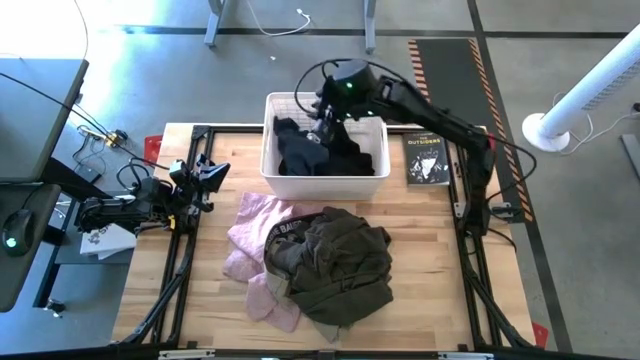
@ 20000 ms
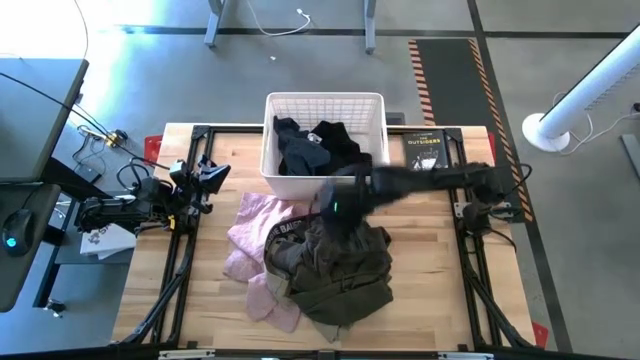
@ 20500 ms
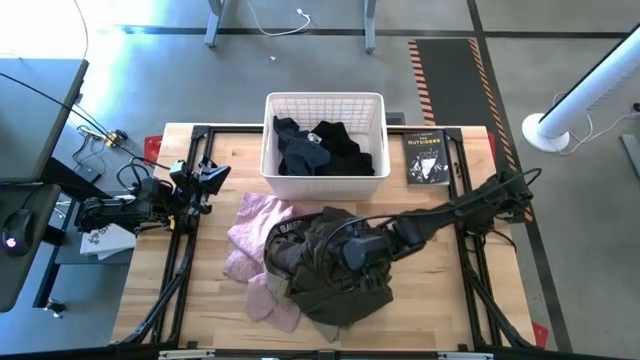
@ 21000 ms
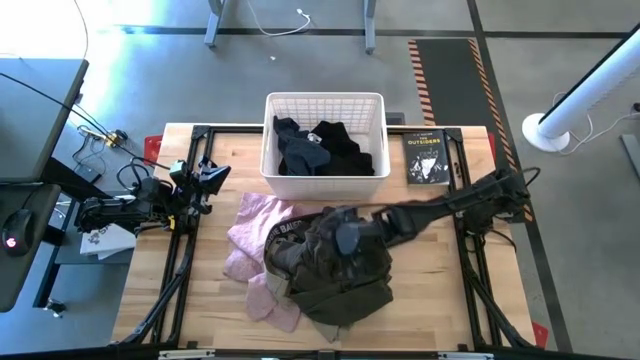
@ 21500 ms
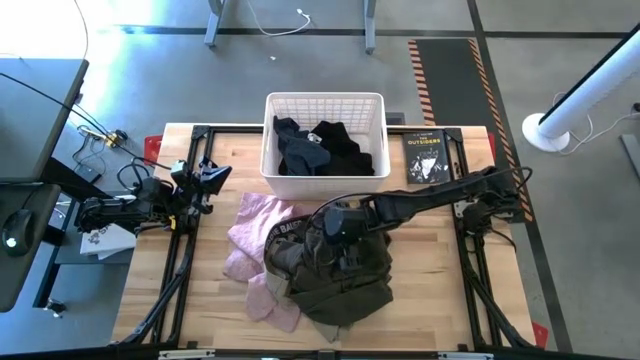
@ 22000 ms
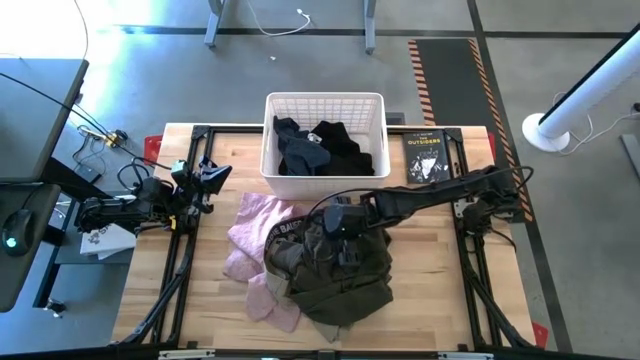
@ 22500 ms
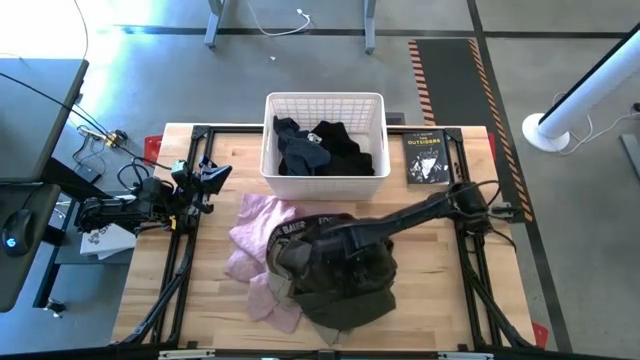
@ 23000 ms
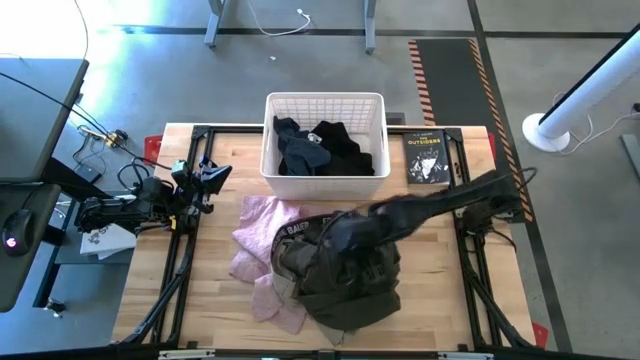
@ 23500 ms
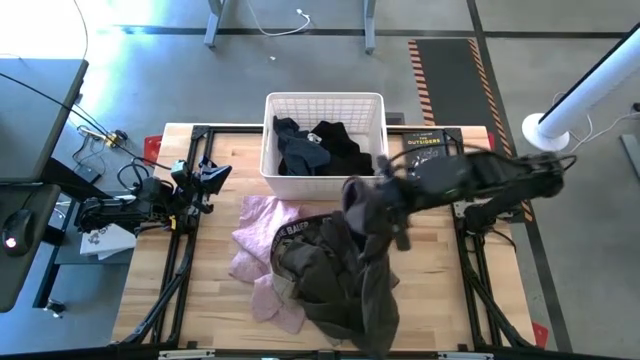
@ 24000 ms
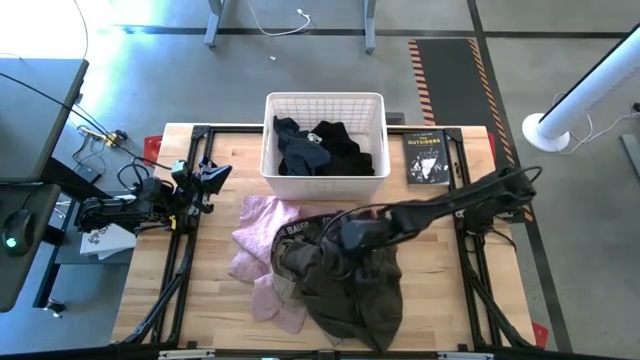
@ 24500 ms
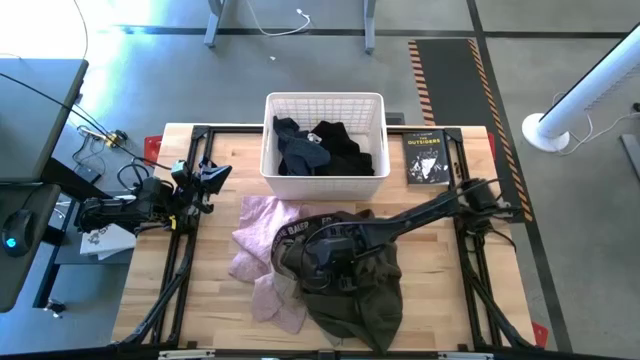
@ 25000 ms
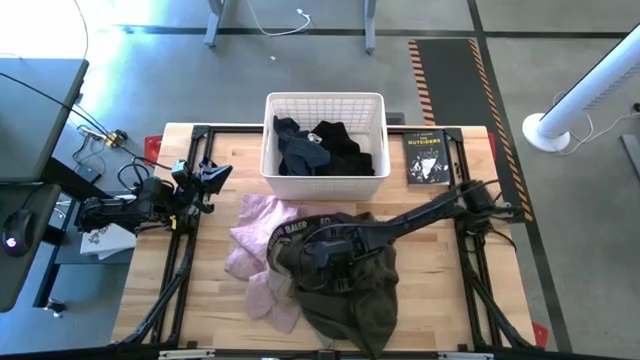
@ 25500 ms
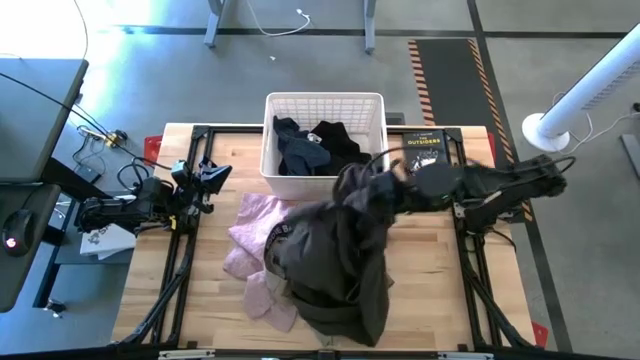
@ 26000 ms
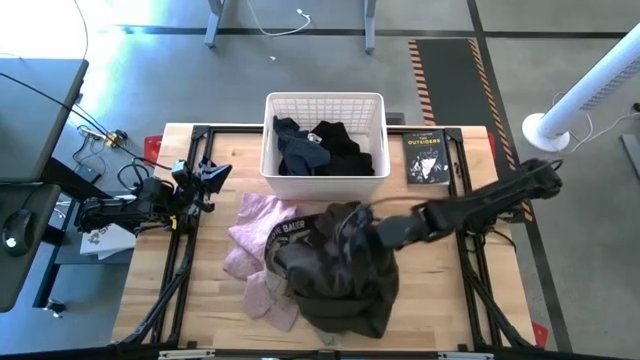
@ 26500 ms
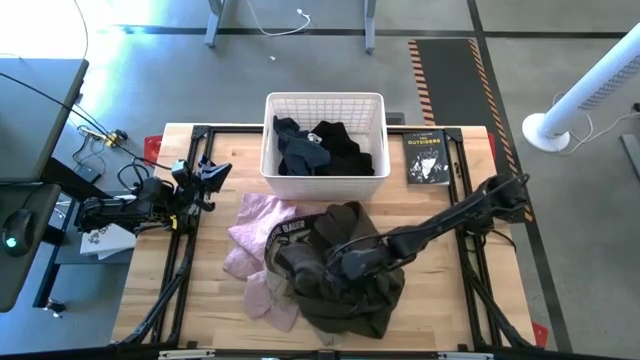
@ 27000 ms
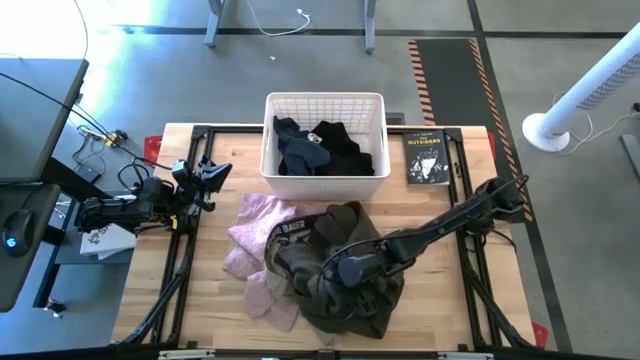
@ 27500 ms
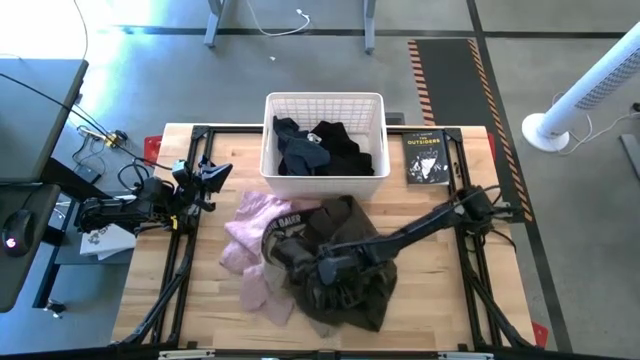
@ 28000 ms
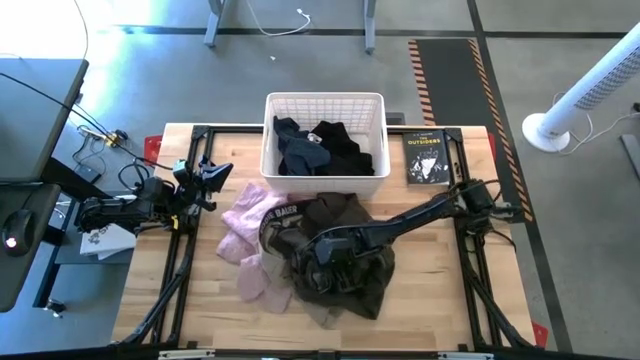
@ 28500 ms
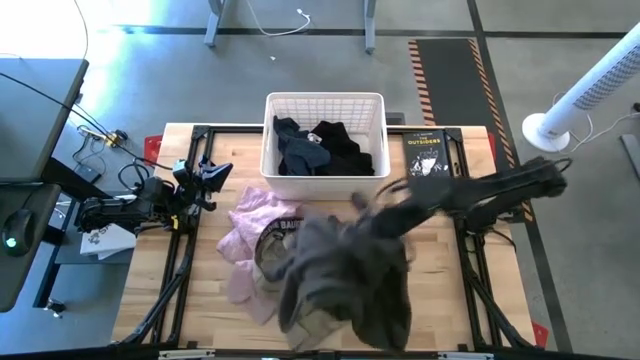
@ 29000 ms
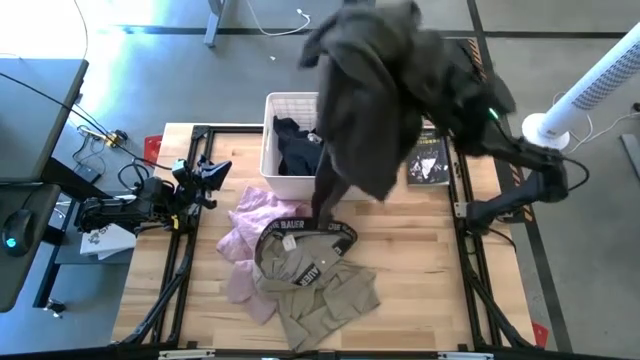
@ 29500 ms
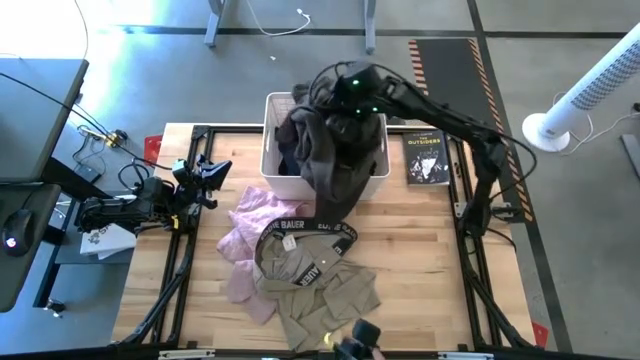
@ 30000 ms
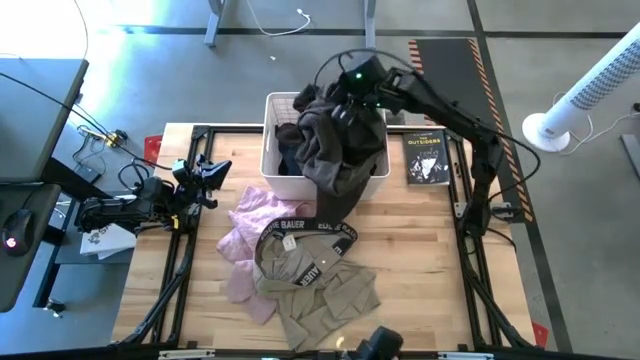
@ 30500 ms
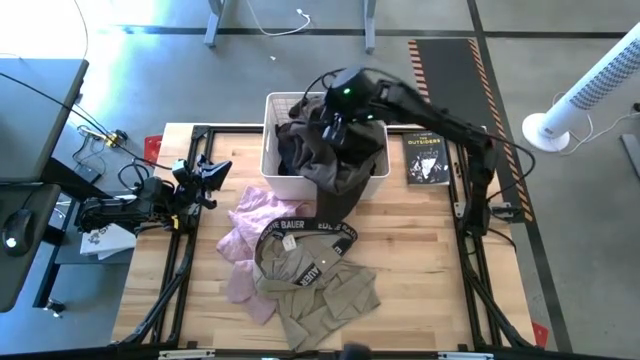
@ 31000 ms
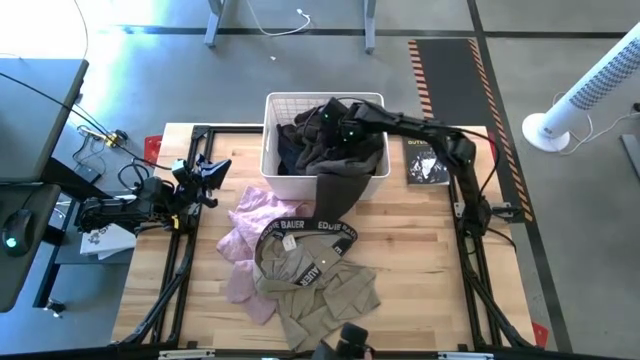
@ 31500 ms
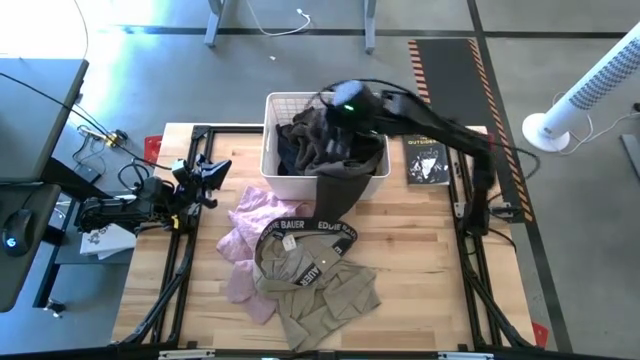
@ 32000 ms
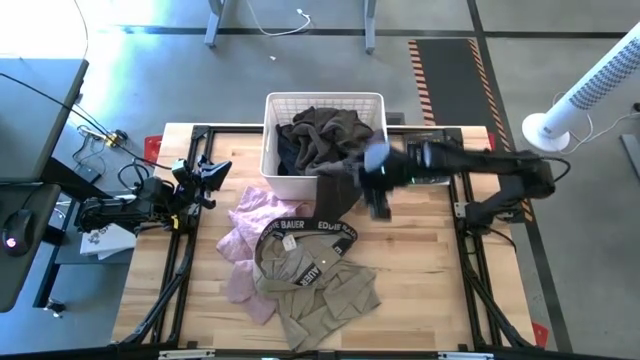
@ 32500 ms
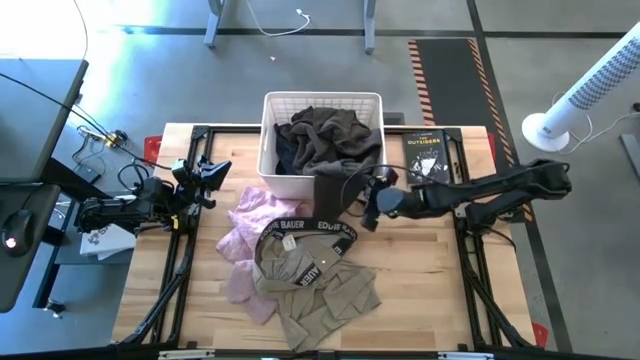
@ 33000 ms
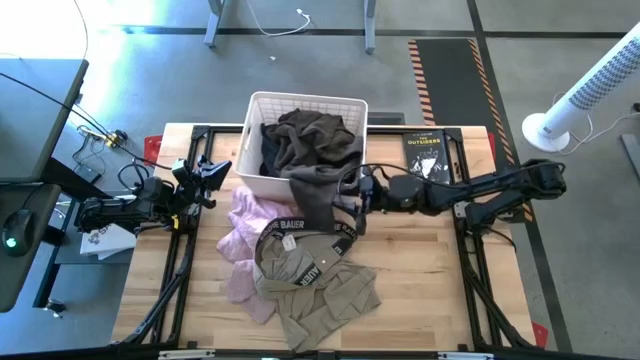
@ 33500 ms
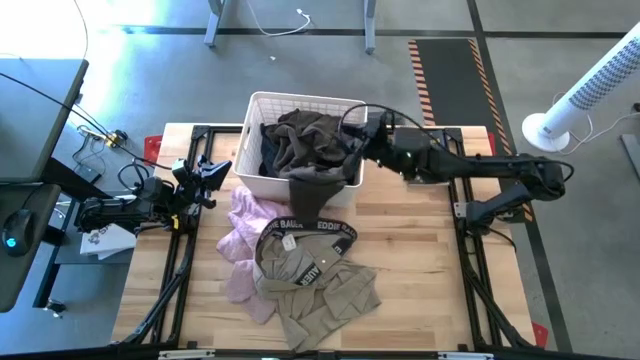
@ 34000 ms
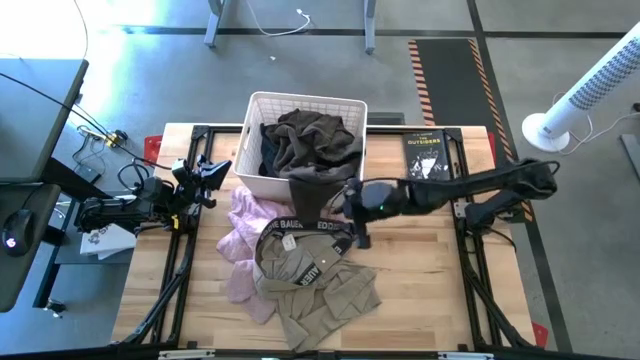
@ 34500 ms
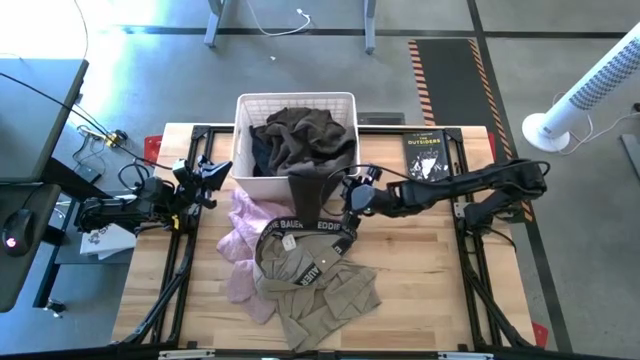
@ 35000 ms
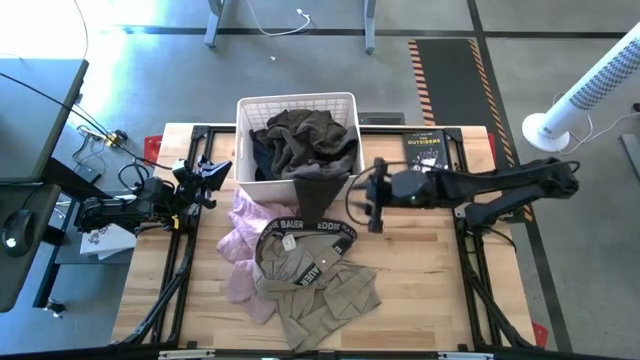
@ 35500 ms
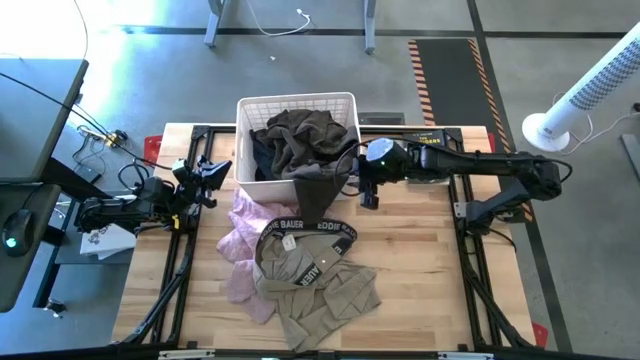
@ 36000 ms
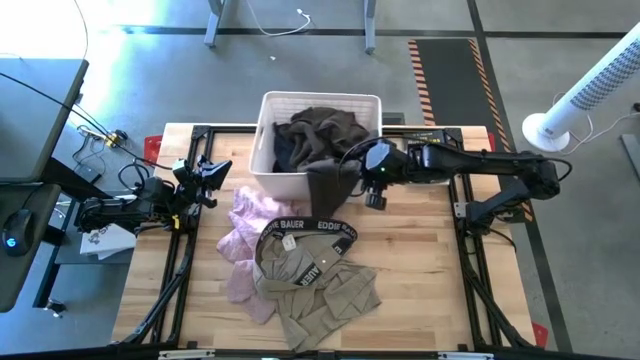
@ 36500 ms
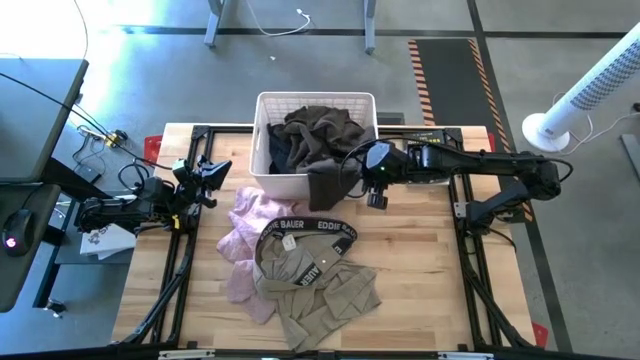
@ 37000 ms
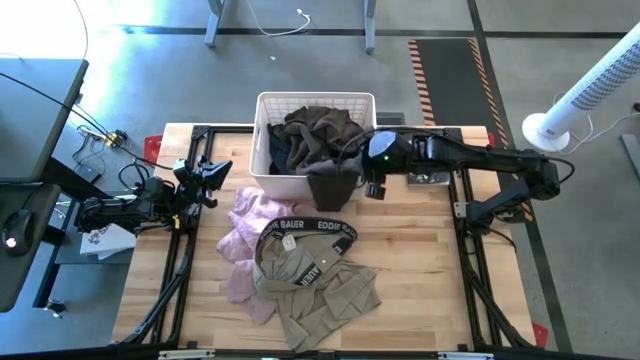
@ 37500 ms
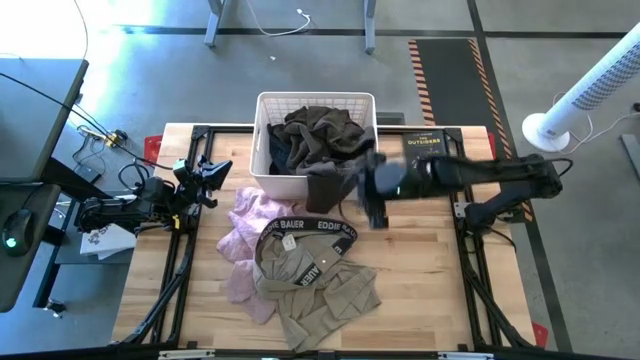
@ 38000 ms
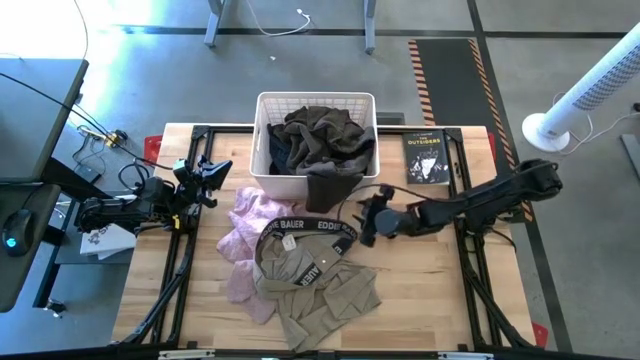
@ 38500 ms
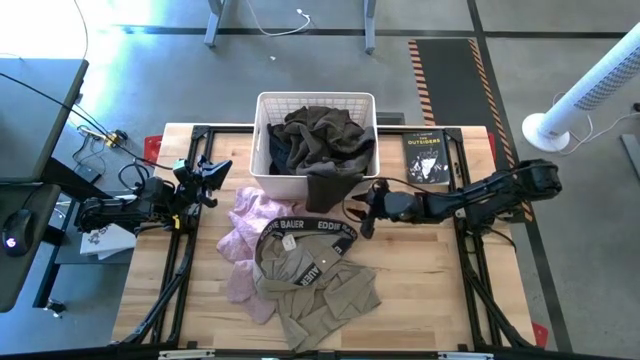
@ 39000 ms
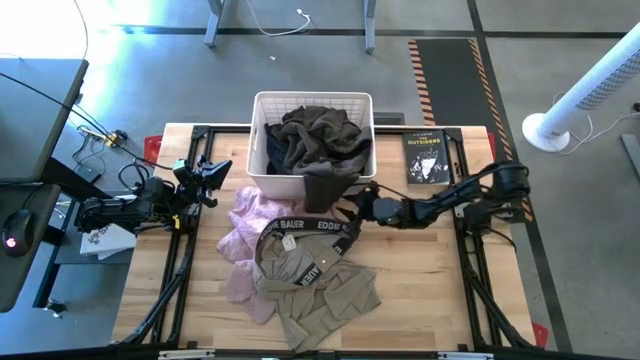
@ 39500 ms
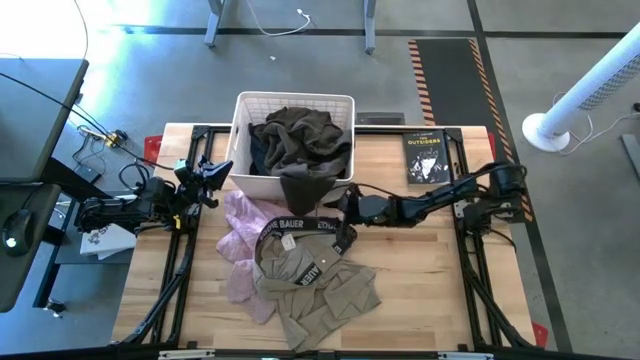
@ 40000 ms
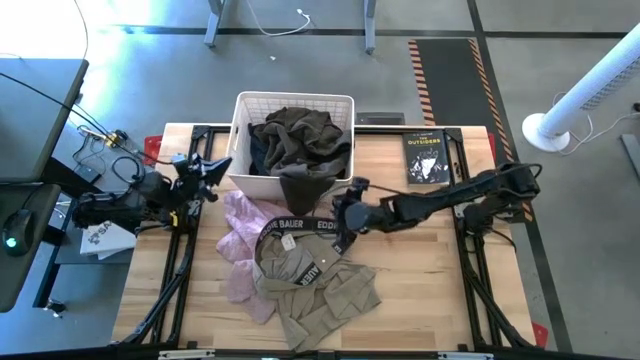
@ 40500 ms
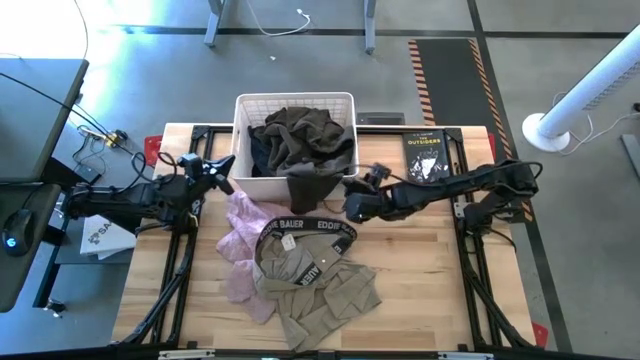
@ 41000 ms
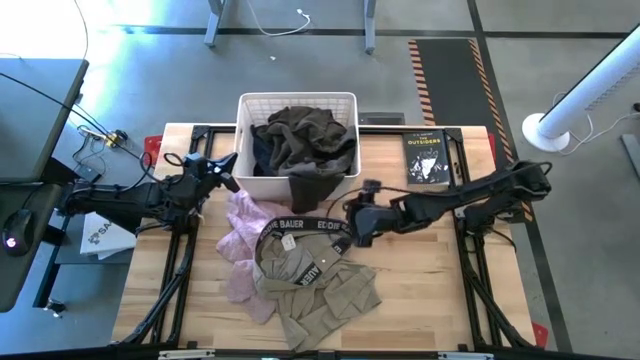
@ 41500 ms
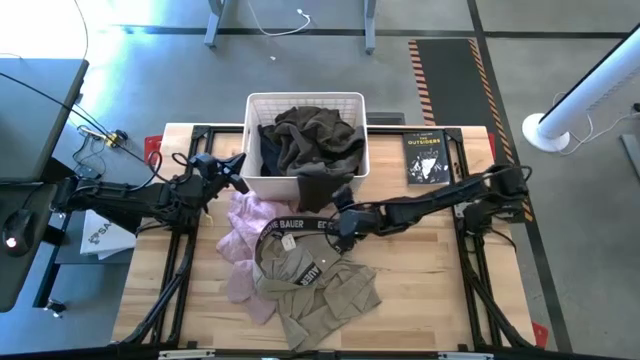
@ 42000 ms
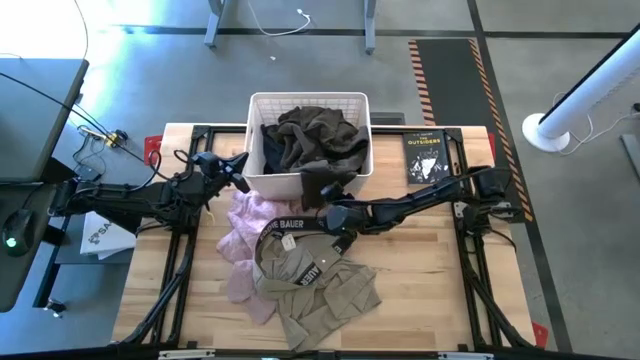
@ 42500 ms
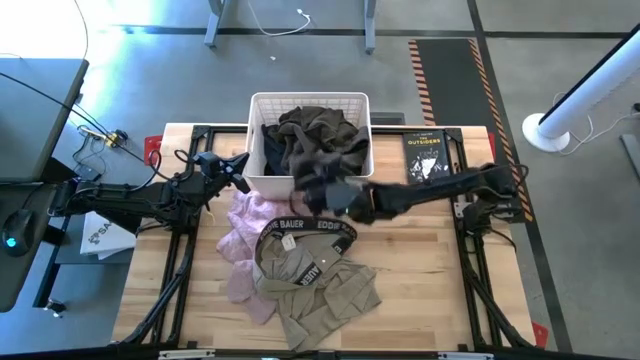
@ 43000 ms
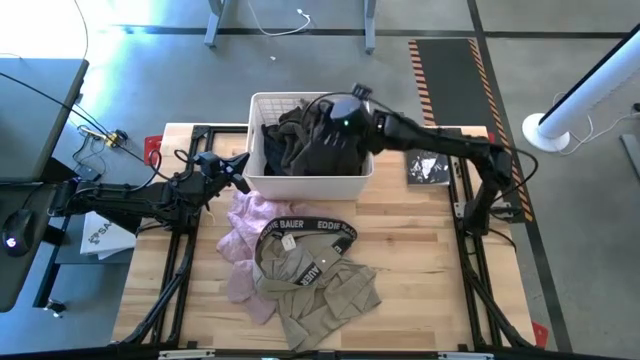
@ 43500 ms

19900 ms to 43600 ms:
Task: Sort clothes
Put the black jacket into the white bin
